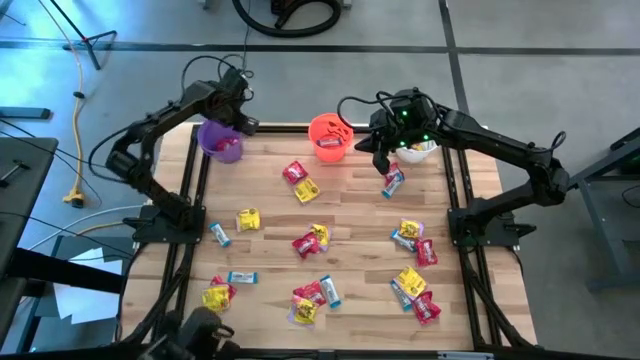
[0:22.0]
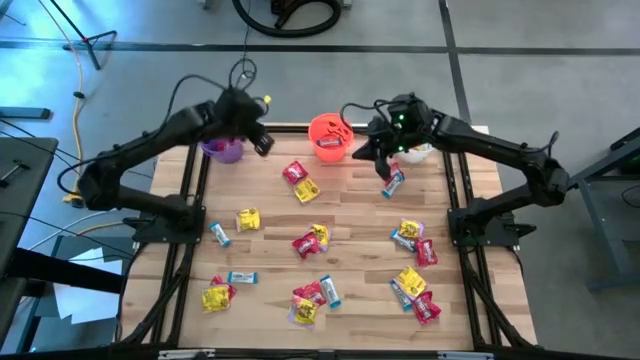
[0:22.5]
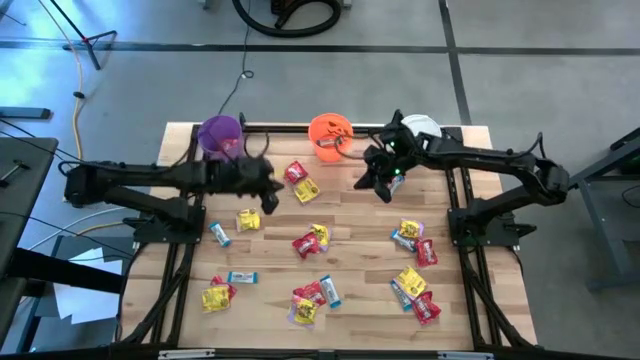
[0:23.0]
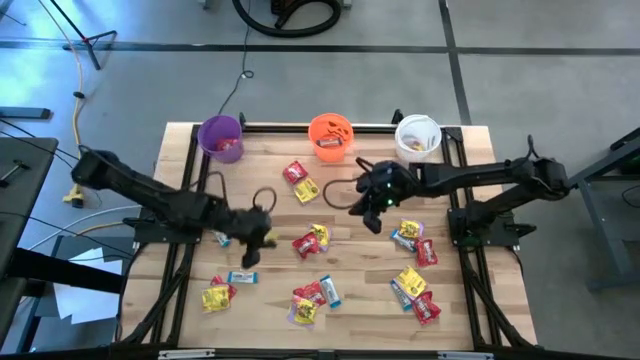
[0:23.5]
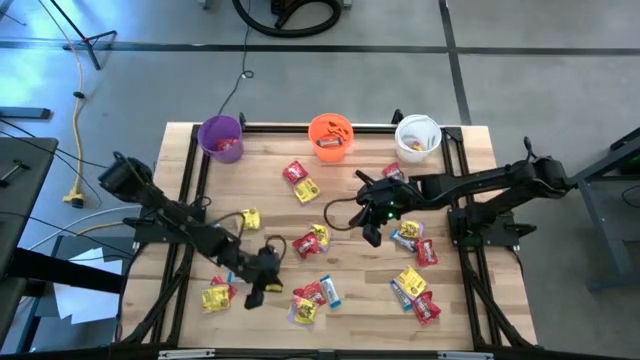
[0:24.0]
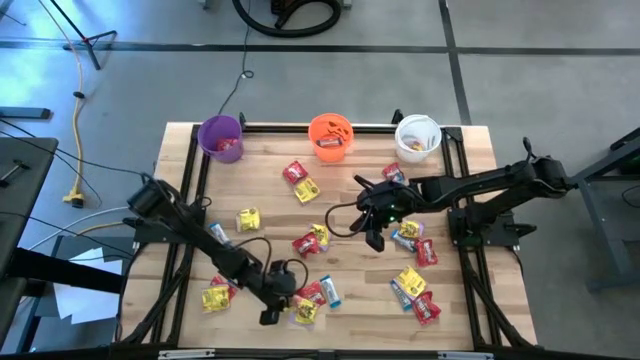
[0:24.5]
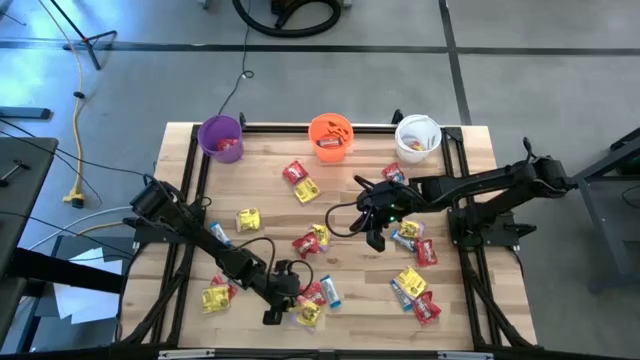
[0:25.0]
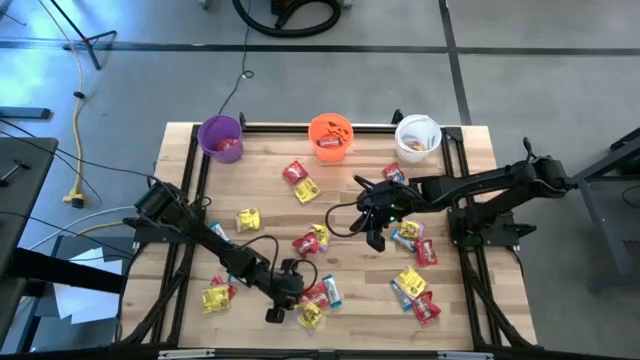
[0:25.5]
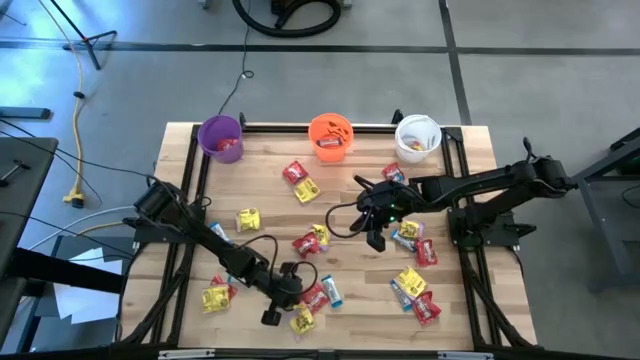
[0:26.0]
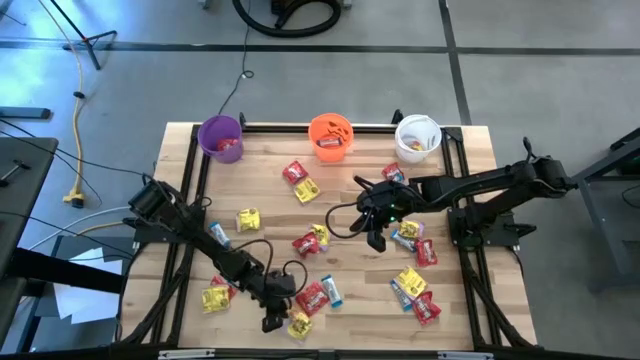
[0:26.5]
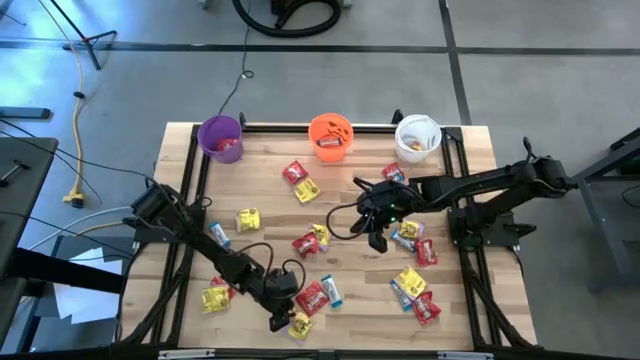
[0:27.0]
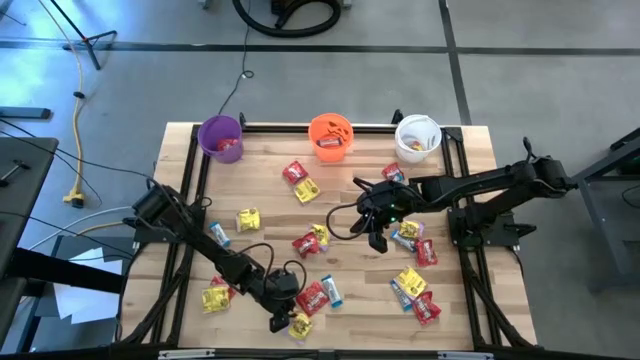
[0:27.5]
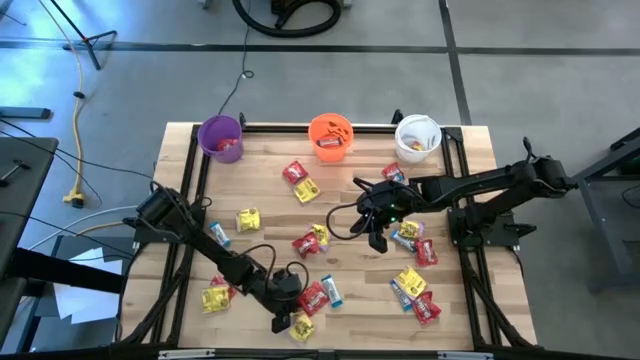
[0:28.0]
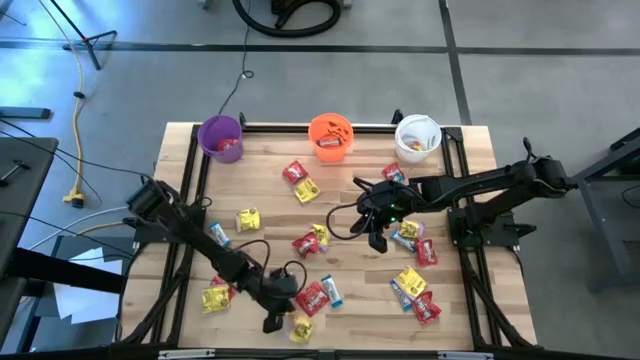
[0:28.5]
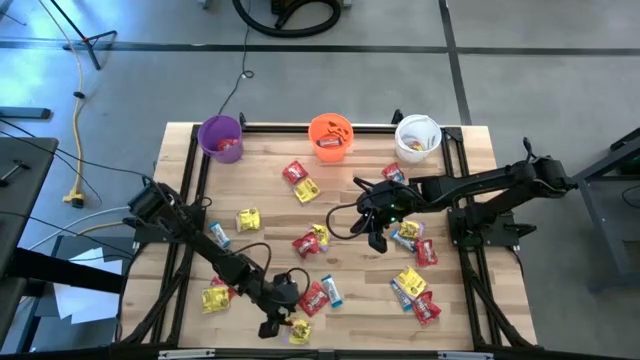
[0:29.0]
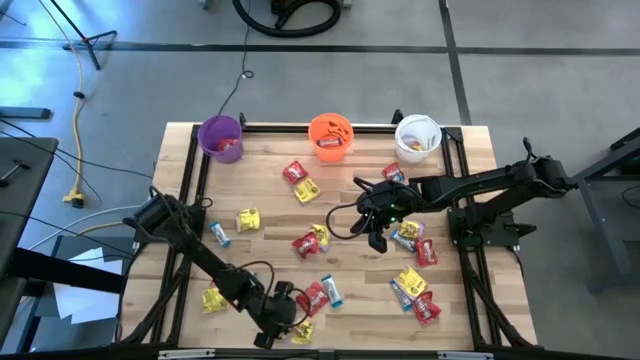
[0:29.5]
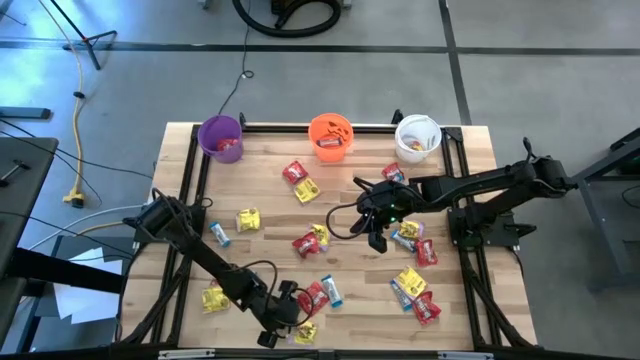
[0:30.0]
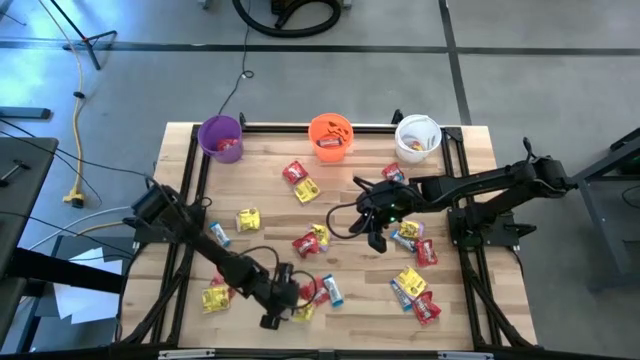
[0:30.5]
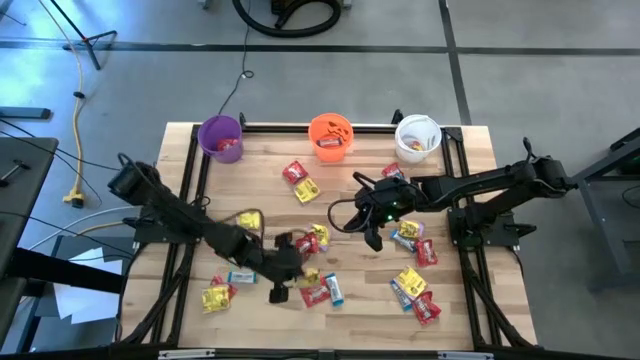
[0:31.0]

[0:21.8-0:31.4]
Task: Organize candy in baskets
Put the yellow candy into the white bucket

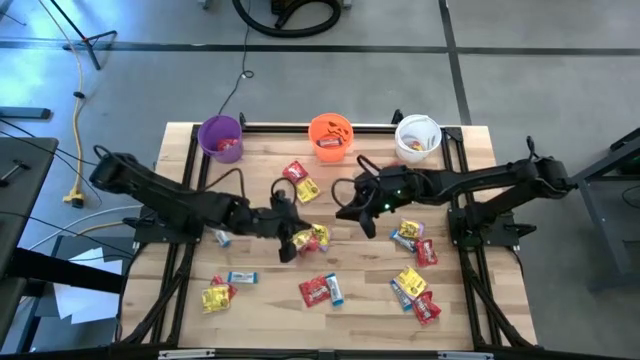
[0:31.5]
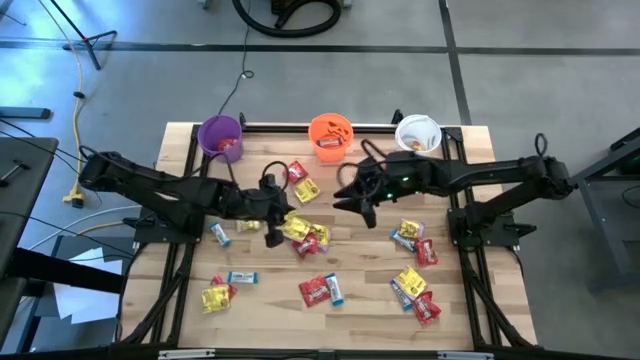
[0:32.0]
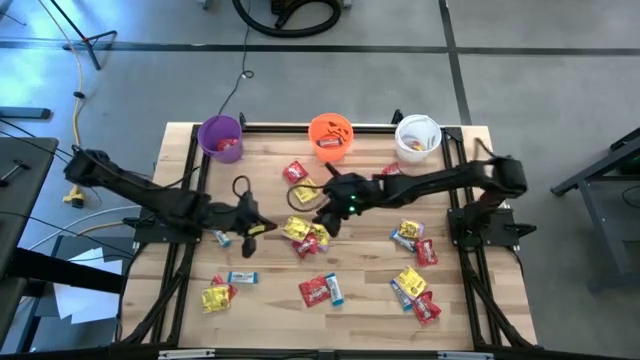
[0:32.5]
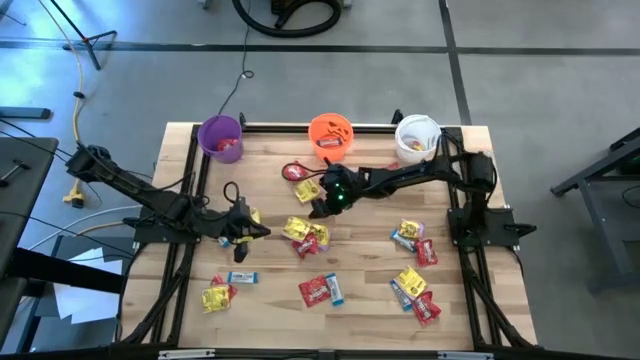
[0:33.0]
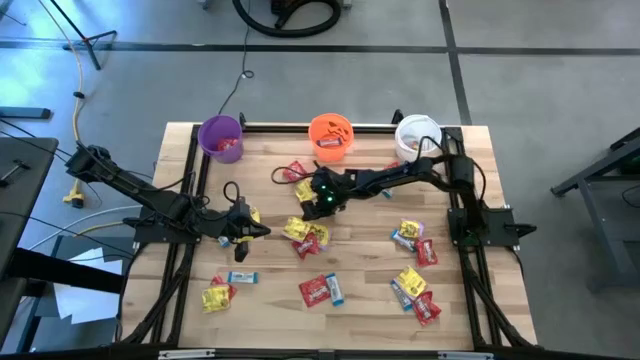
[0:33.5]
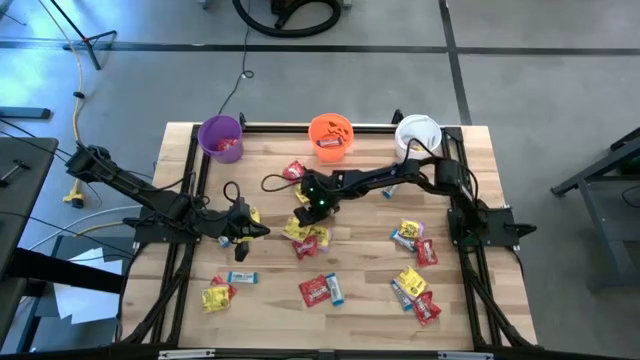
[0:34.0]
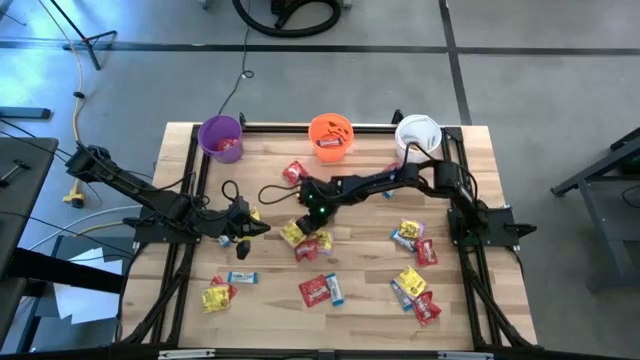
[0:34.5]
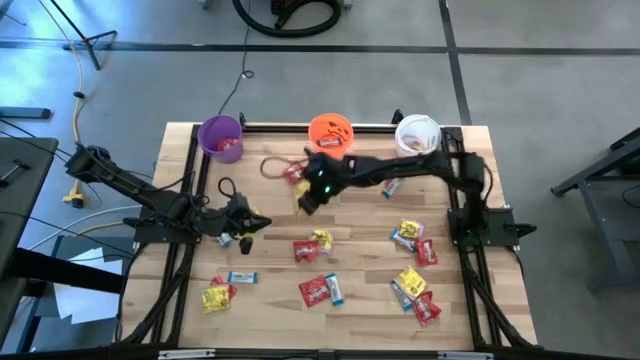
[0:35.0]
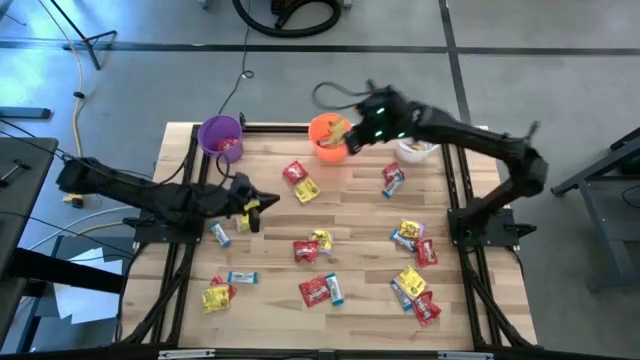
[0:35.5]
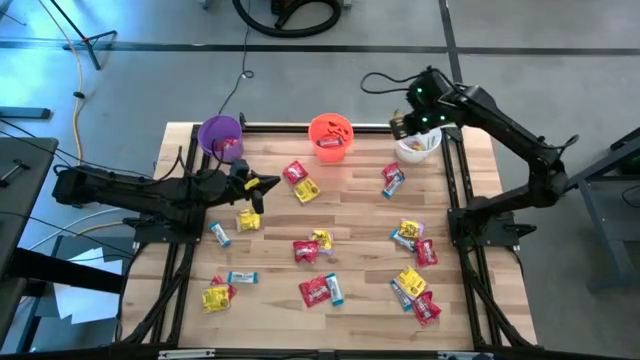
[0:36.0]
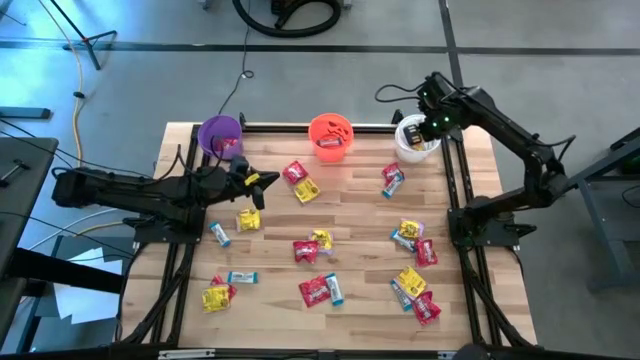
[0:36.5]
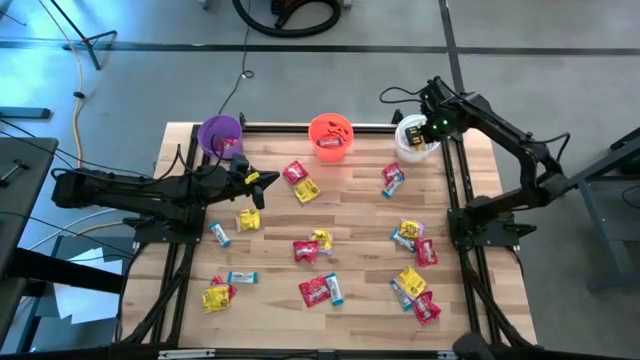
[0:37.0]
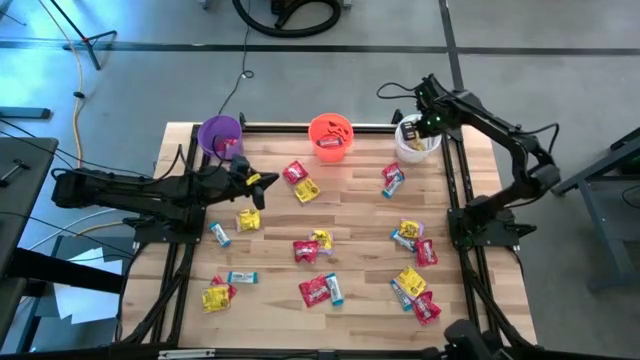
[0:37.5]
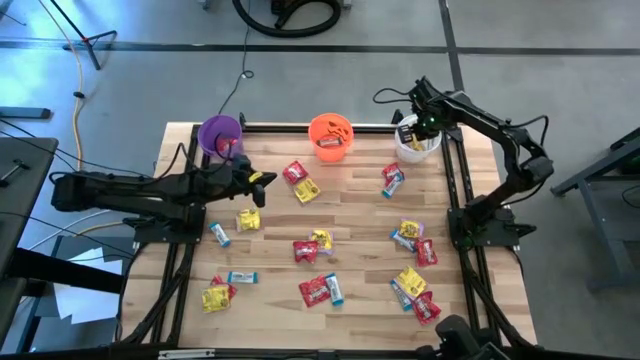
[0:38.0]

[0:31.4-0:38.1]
Put the yellow candy into the white bucket

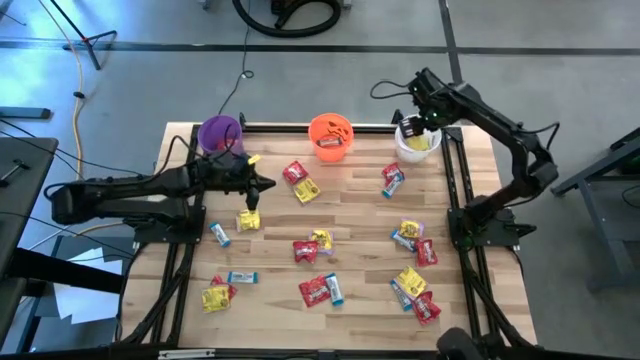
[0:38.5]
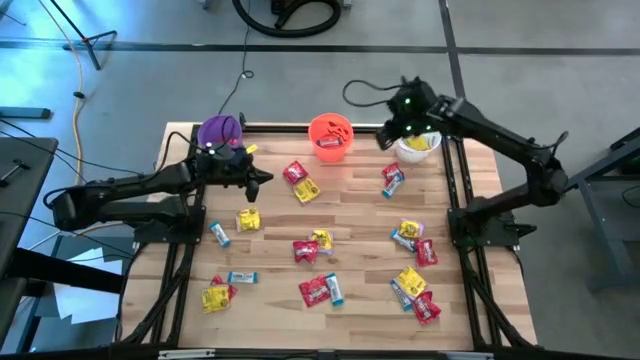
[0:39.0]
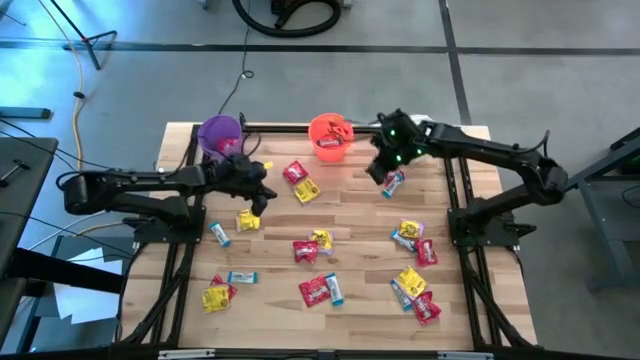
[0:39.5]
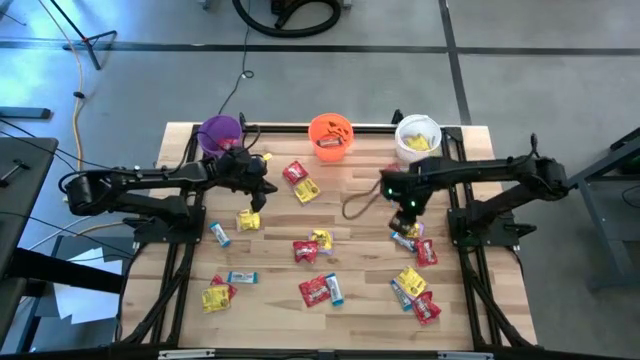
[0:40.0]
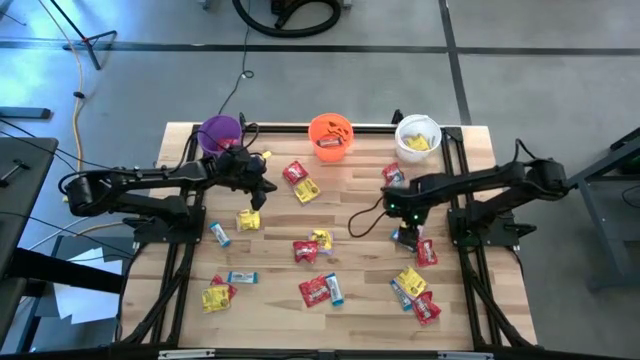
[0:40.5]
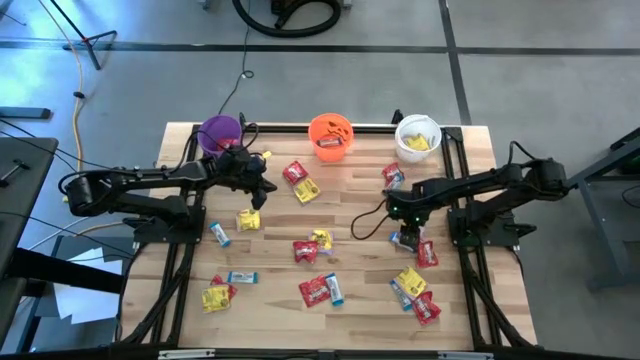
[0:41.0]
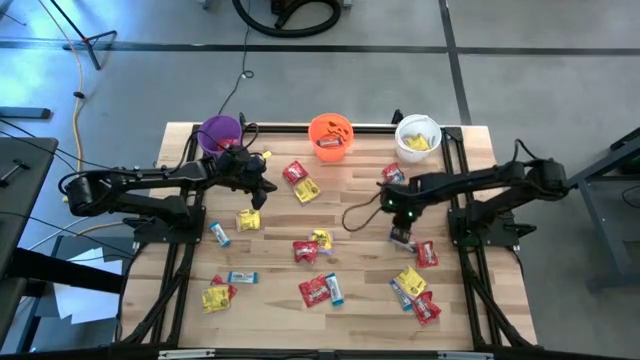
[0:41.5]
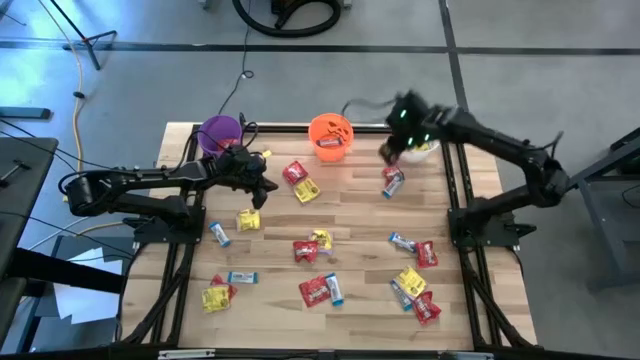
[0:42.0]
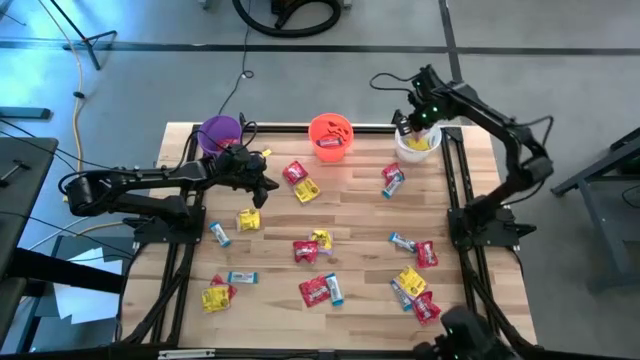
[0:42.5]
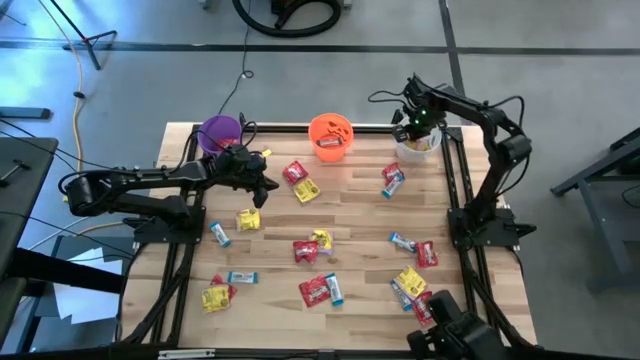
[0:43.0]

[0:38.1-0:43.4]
Put the yellow candy into the white bucket
